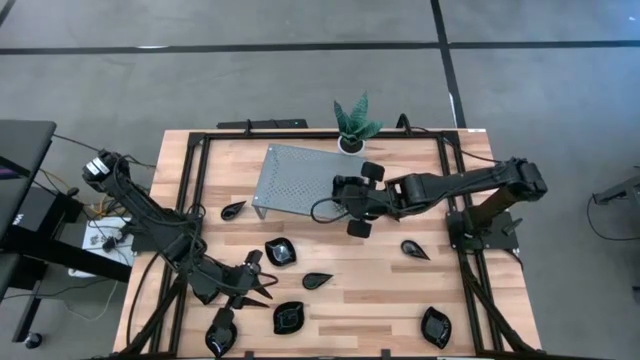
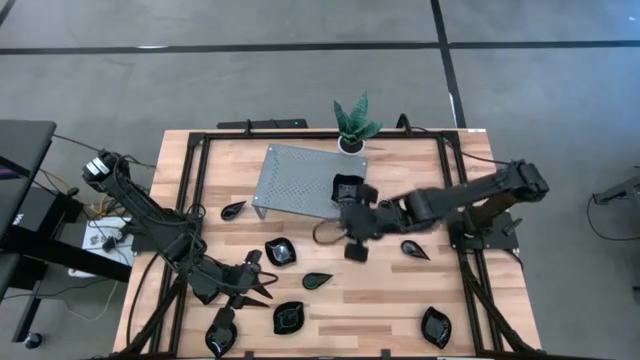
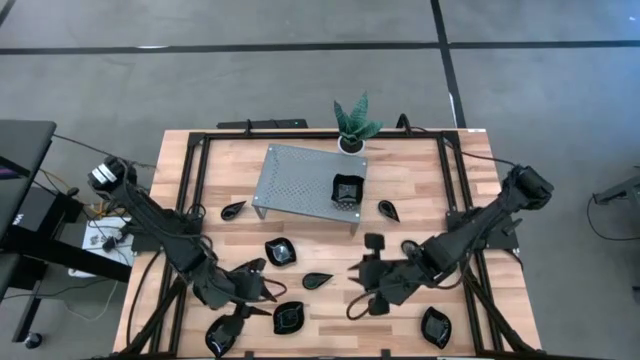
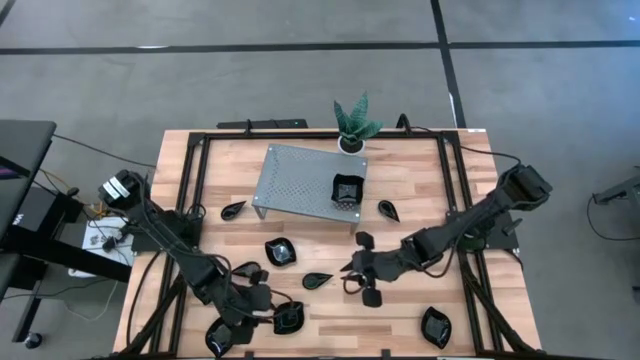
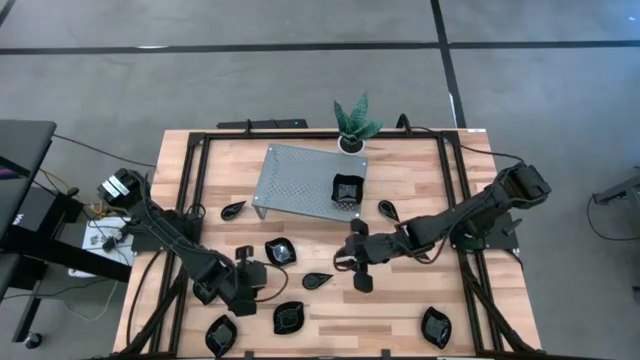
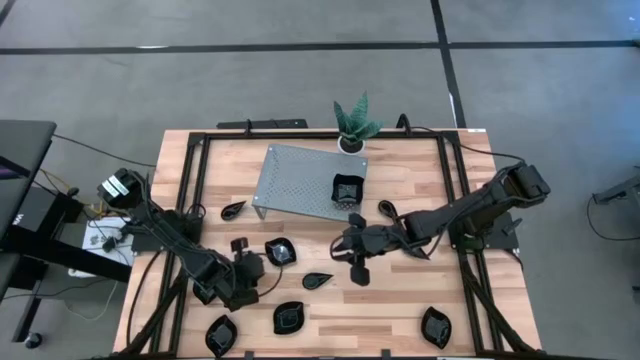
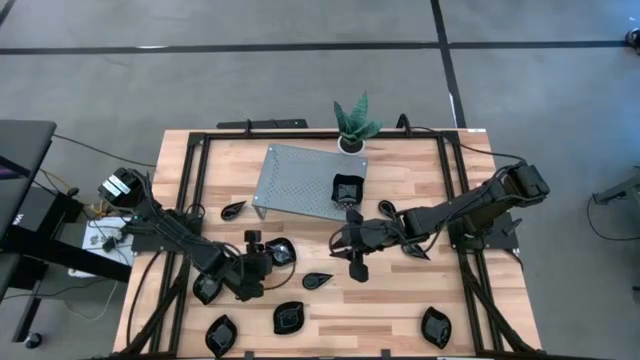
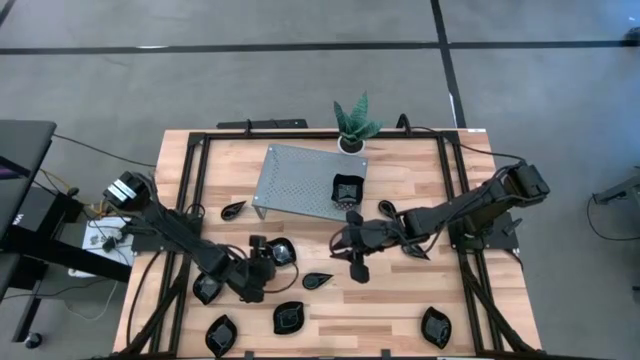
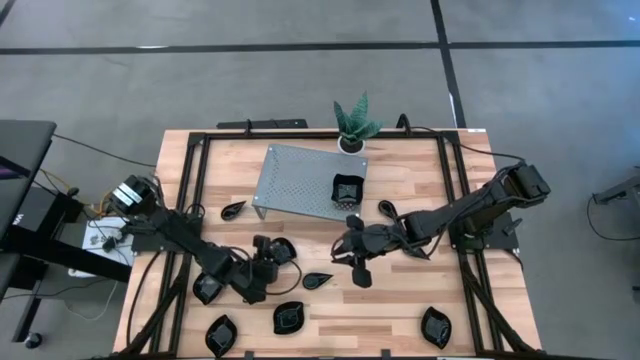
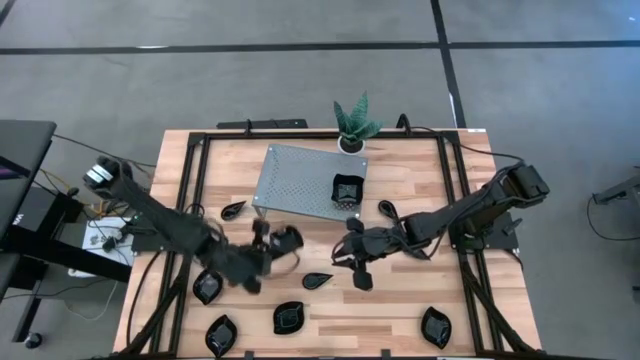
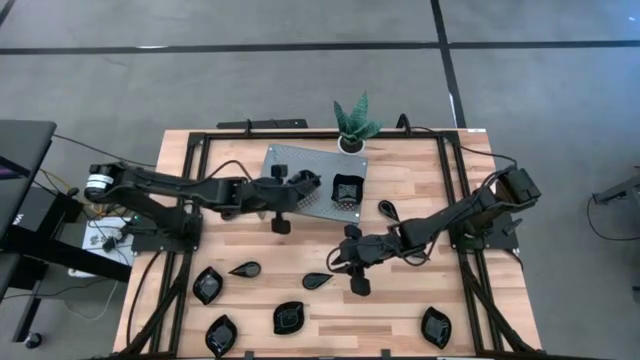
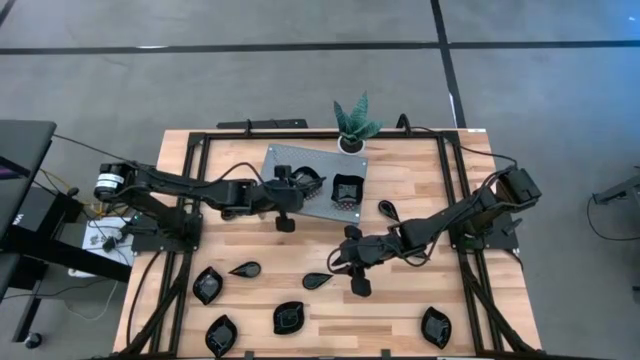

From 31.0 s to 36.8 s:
Task: Pick & Place Mini shaped plates
Put the leaf shaped plate on the shelf

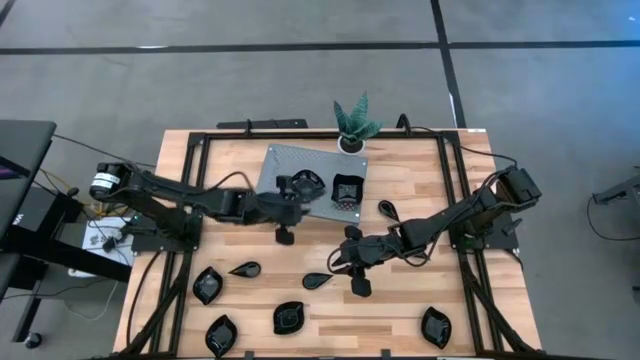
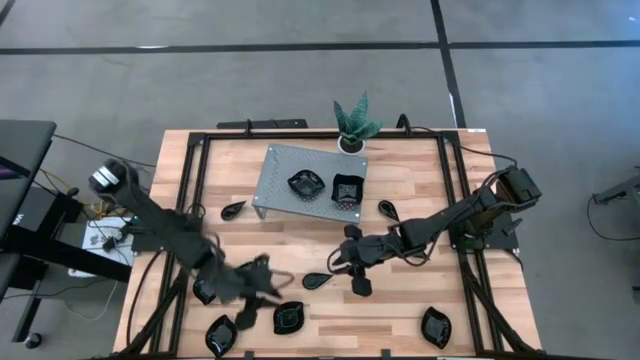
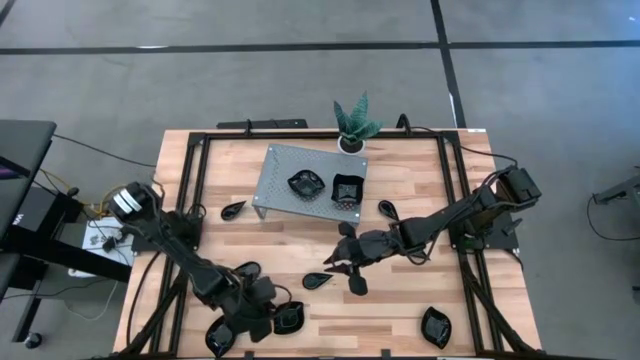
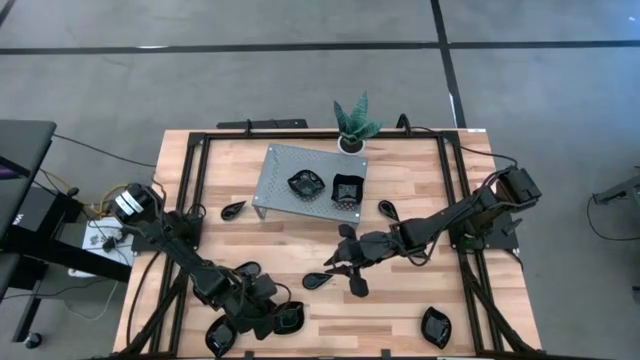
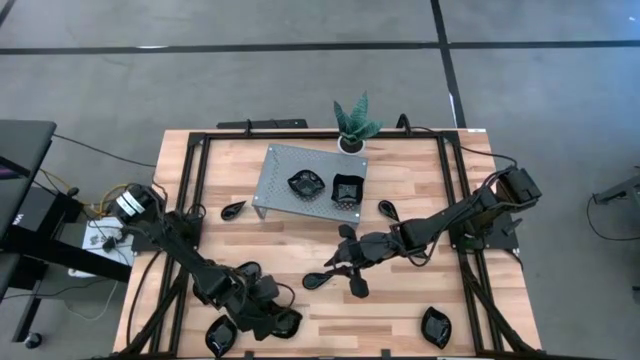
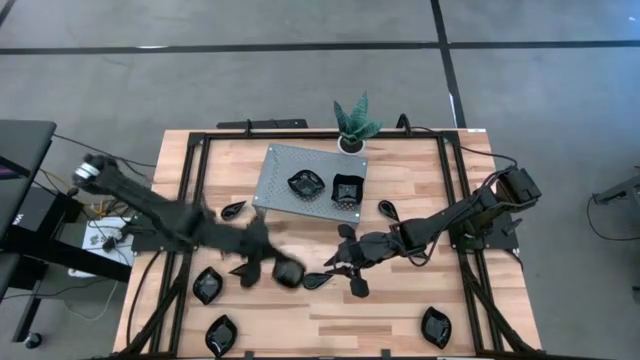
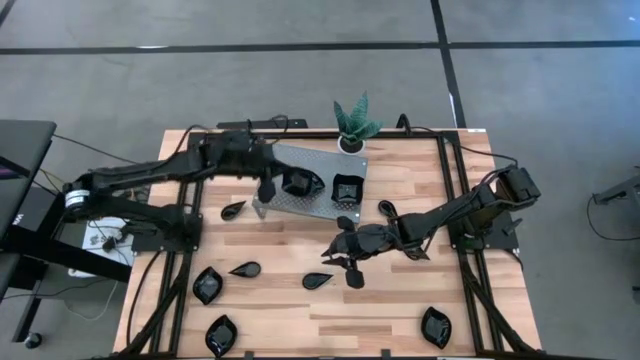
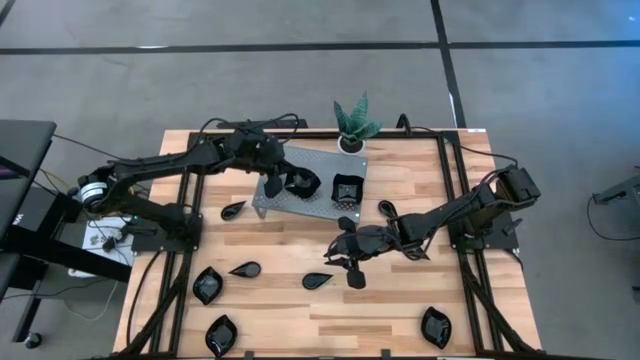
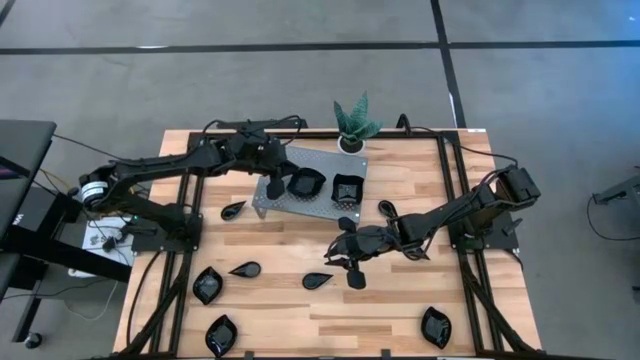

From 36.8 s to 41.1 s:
Stack the leaf shaped plate on top of the leaf shaped plate on the shelf

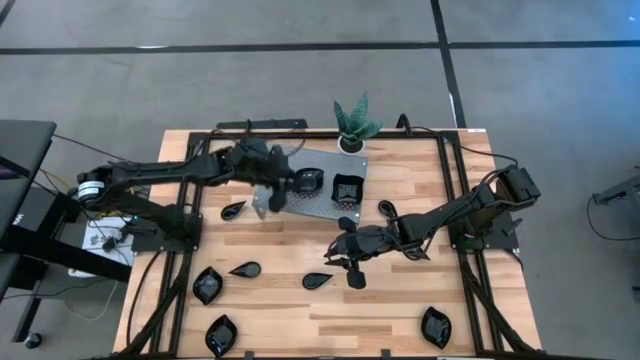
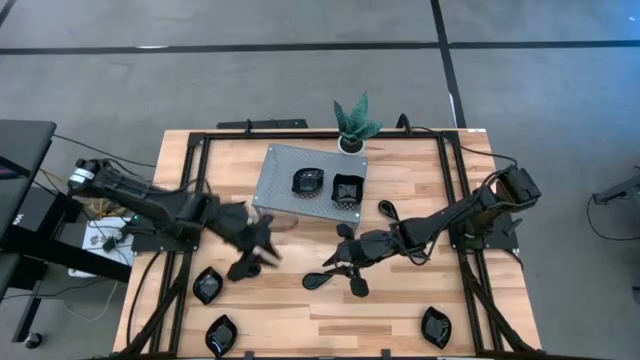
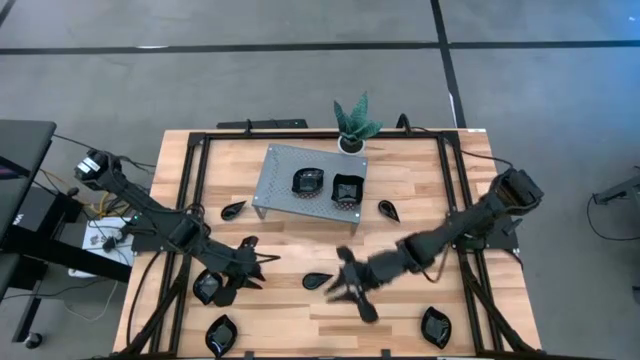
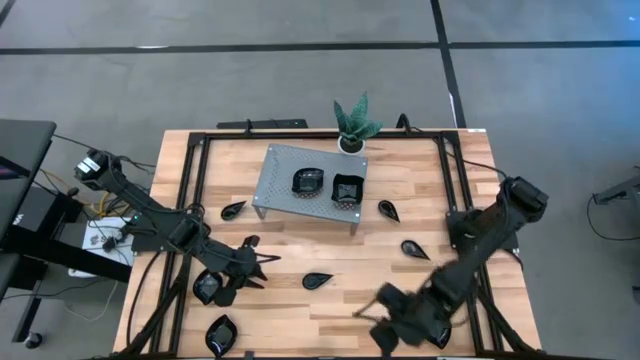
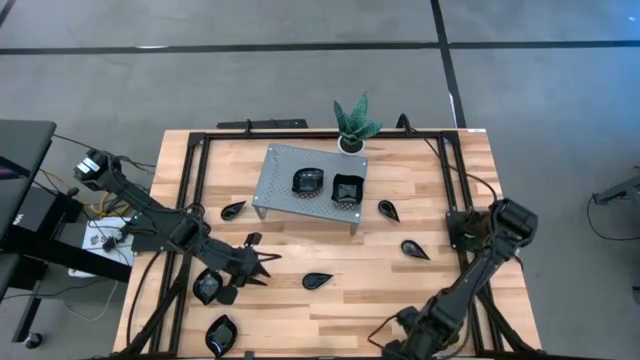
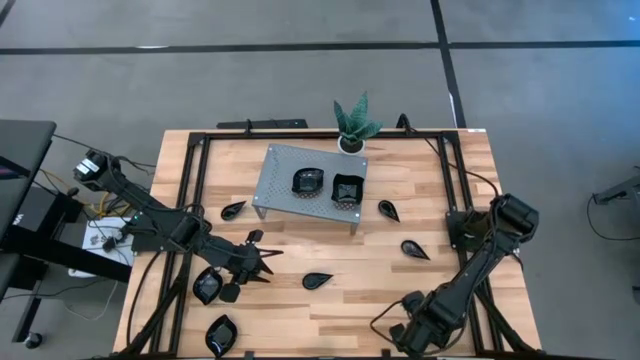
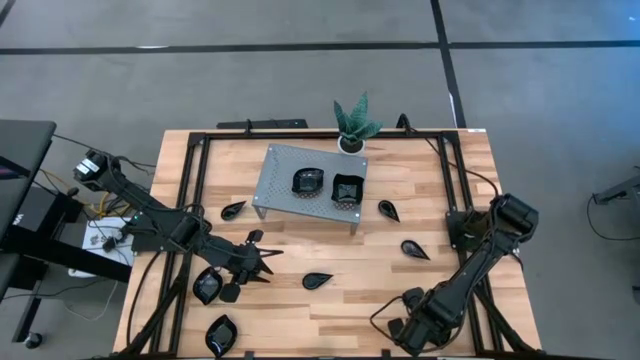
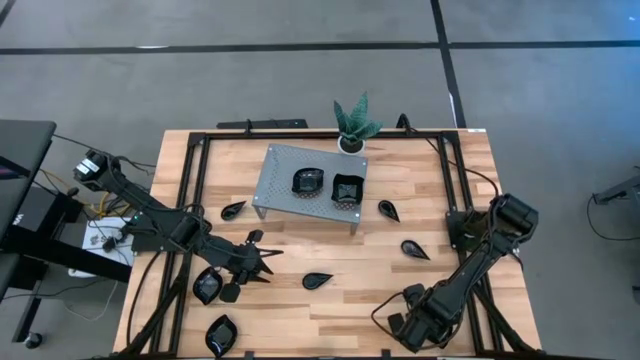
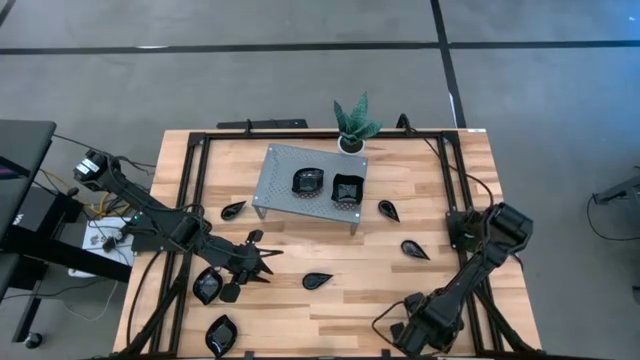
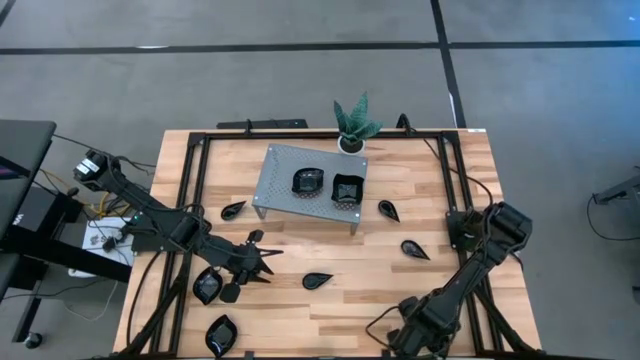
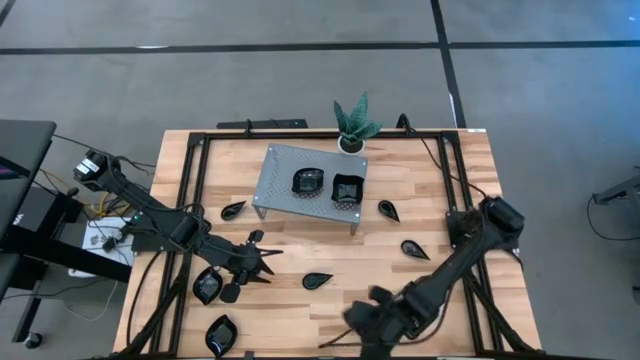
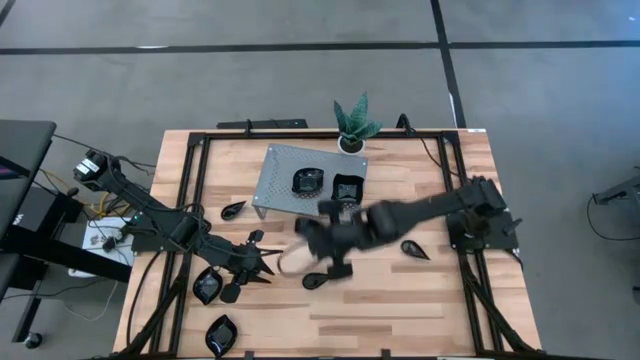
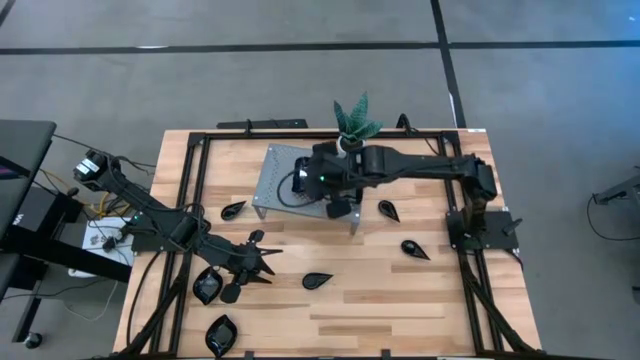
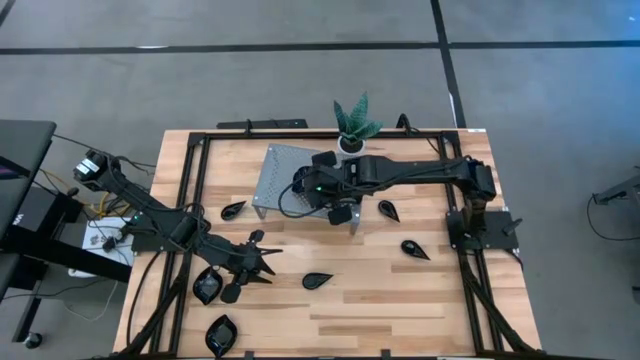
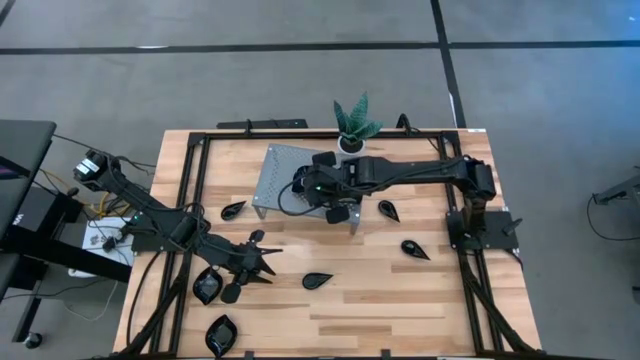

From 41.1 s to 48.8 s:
Stack the leaf shaped plate on top of the leaf shaped plates on the shelf

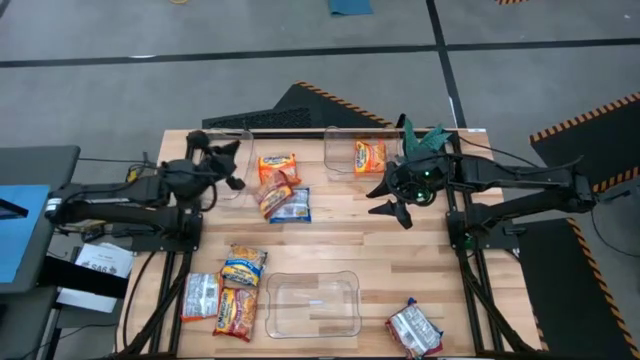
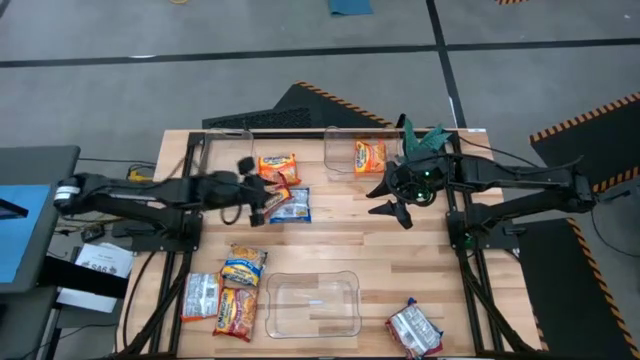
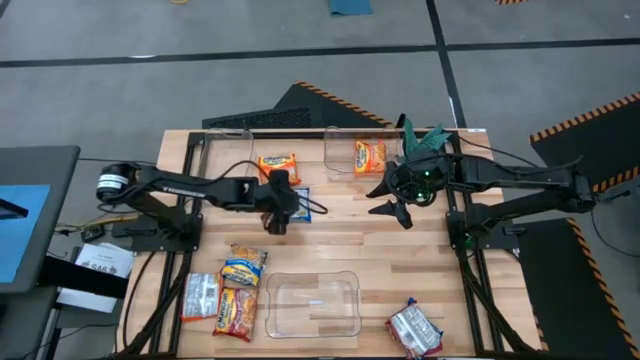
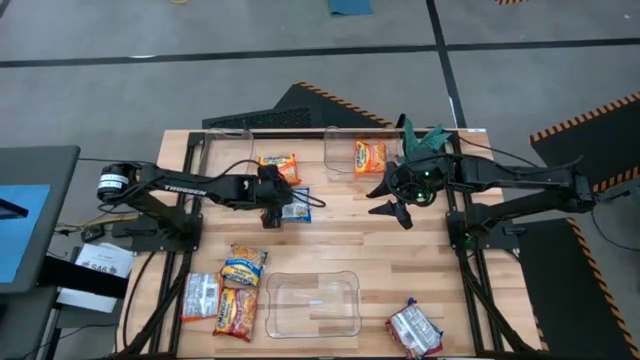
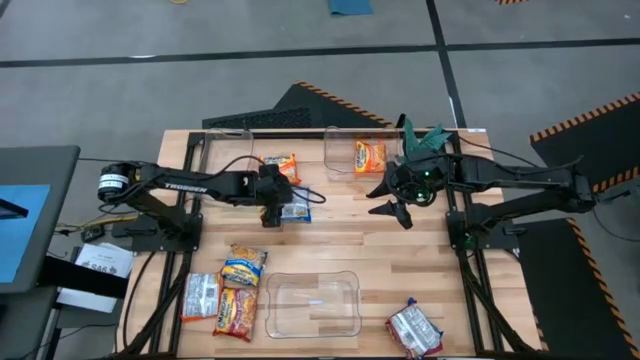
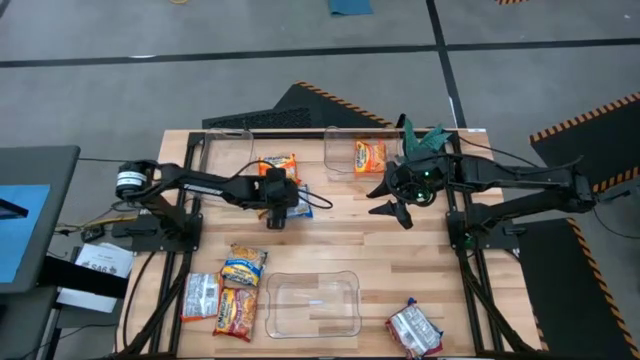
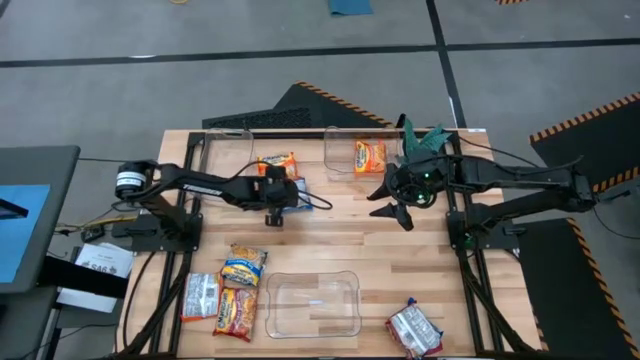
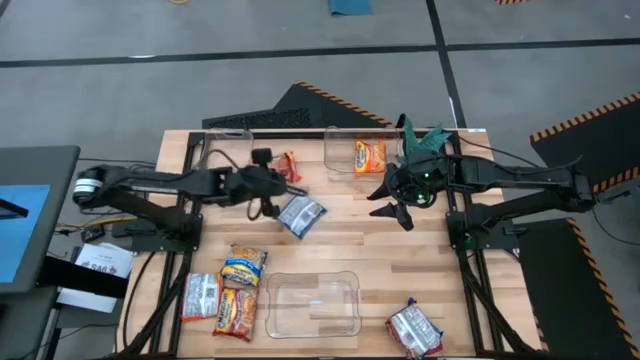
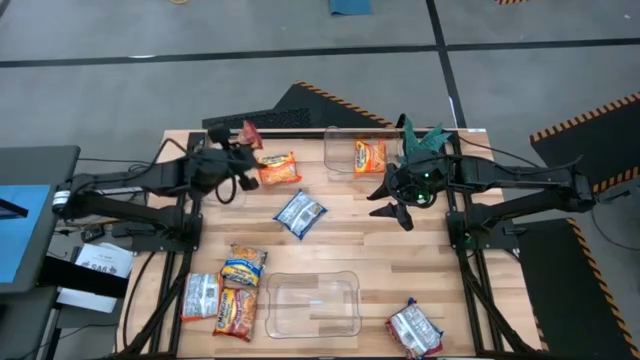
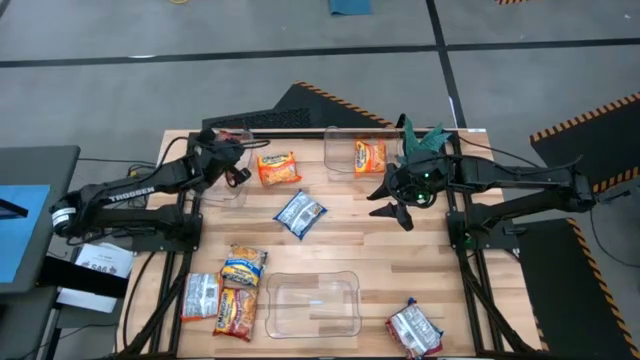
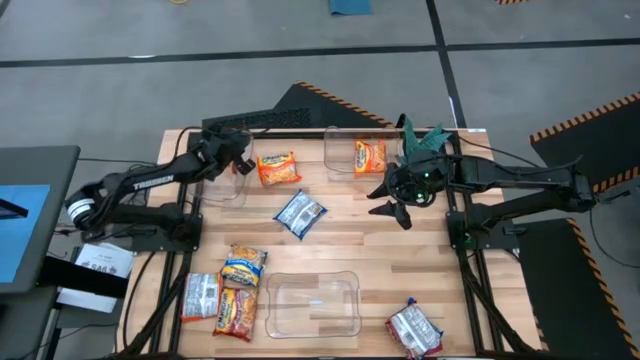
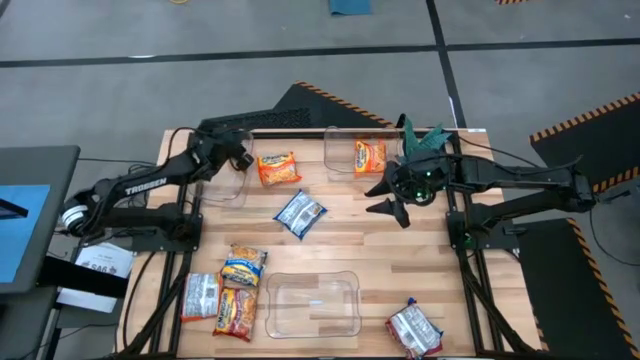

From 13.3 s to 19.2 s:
Task: Sort Maruchan noodles
Put the top red noodle pack into the top left transparent bin
